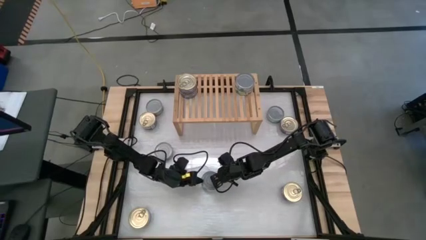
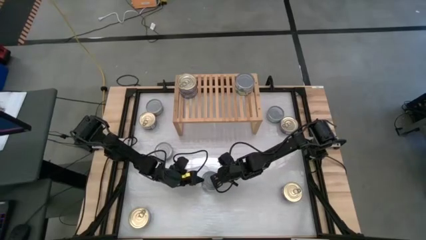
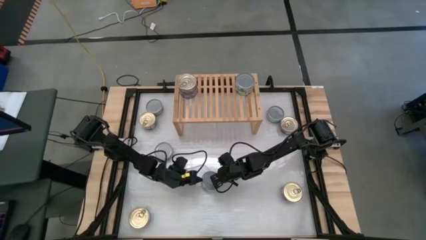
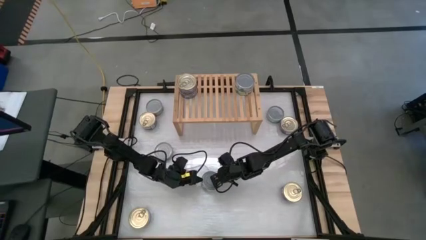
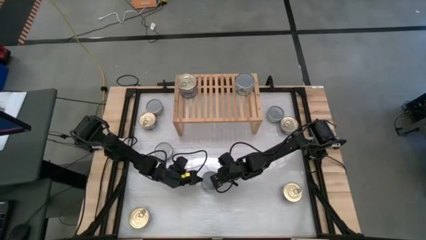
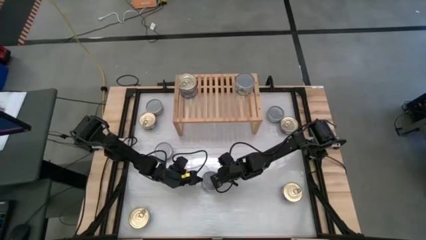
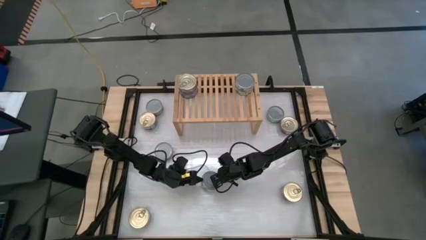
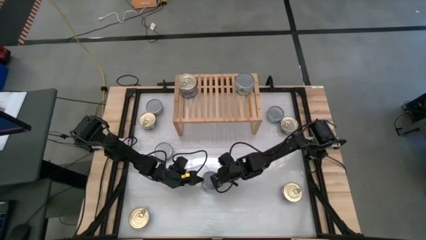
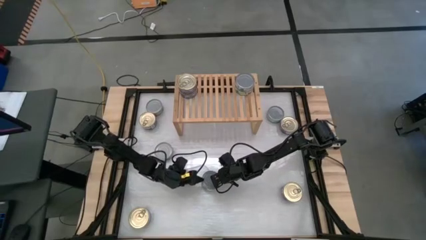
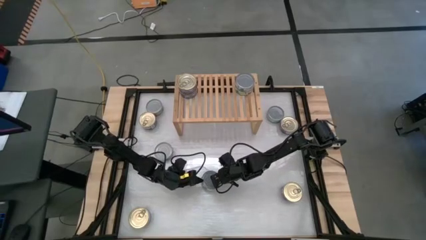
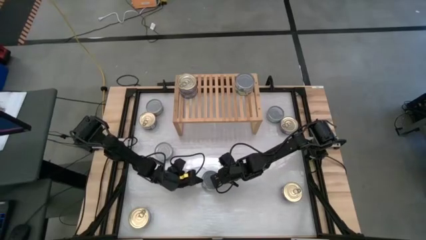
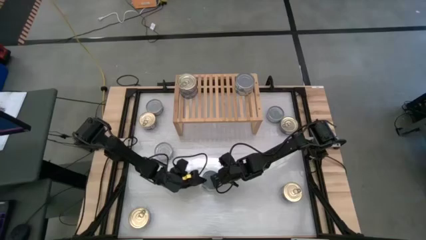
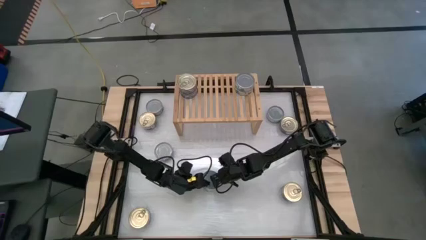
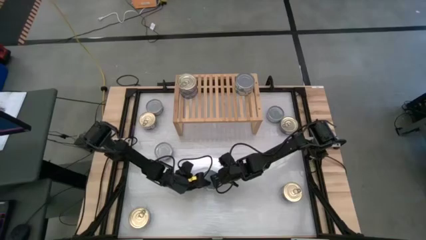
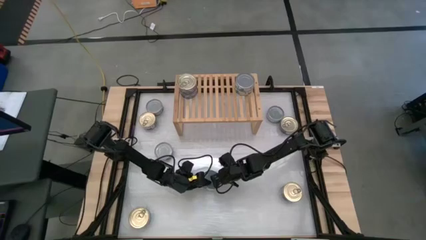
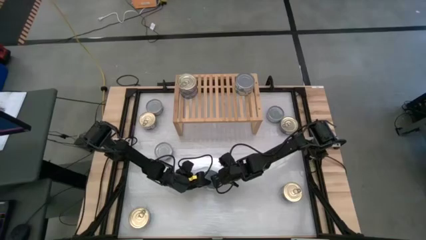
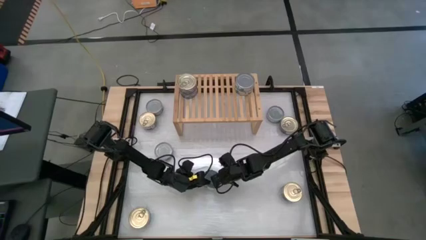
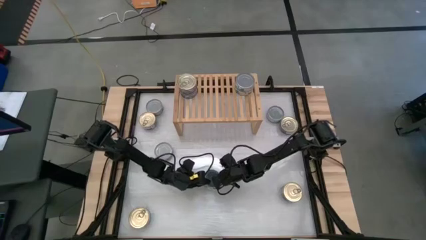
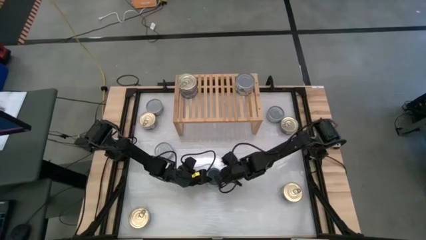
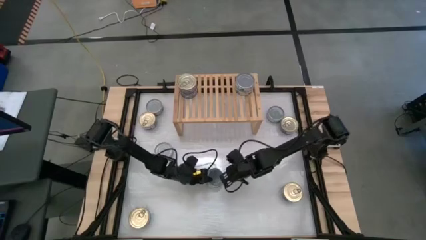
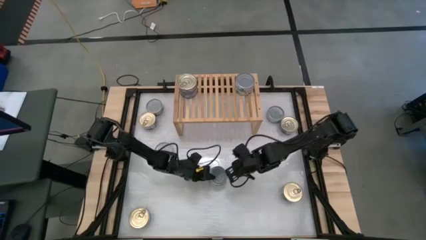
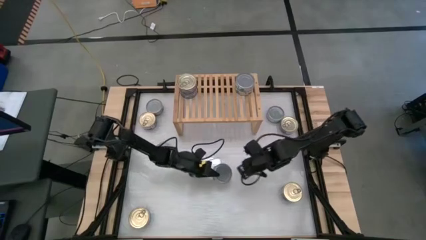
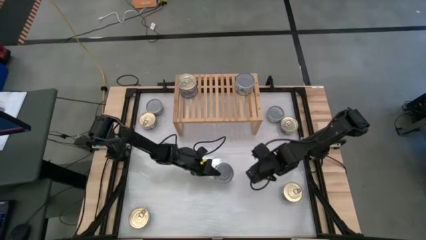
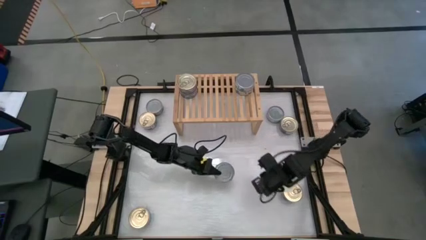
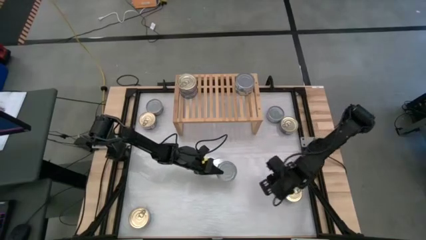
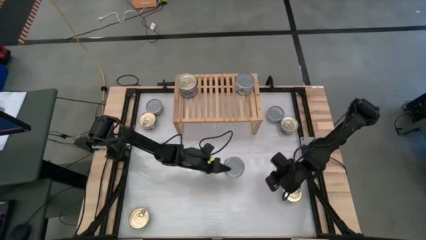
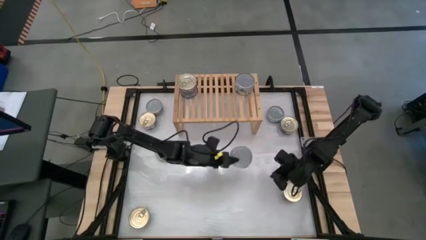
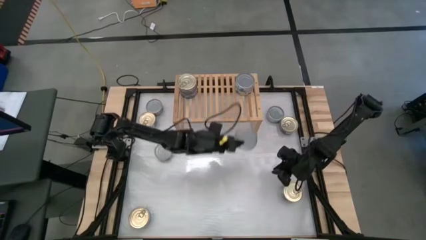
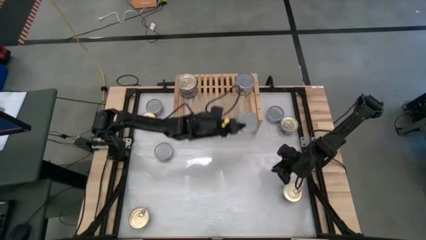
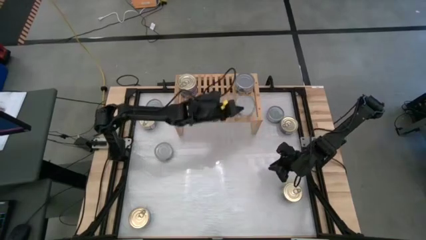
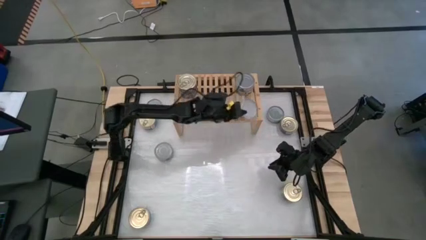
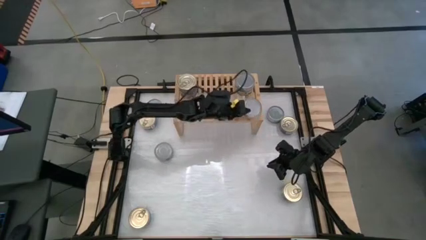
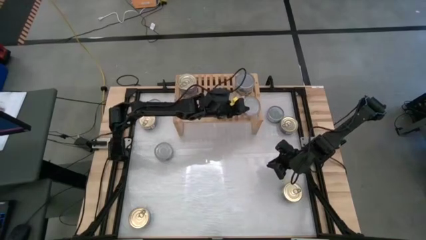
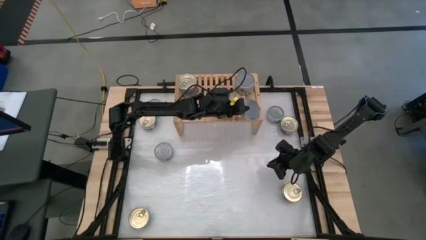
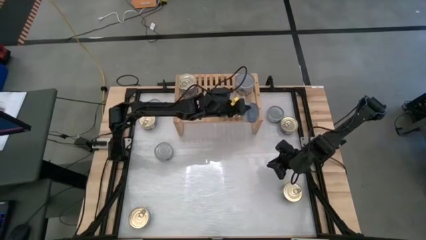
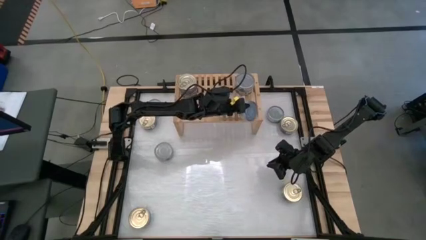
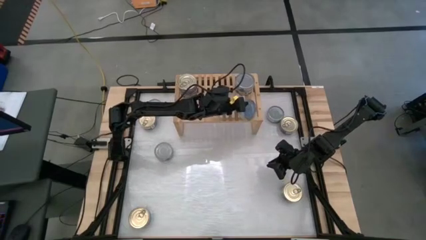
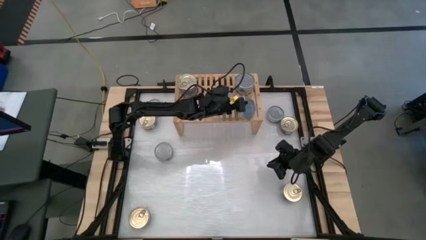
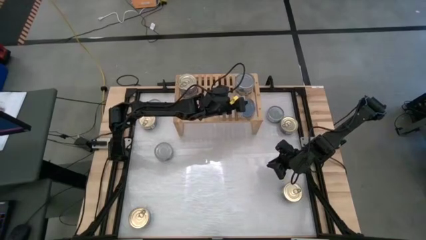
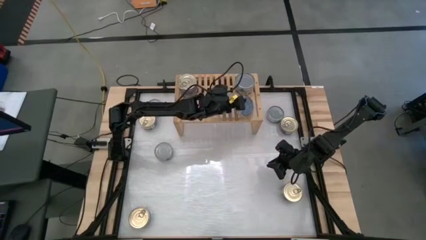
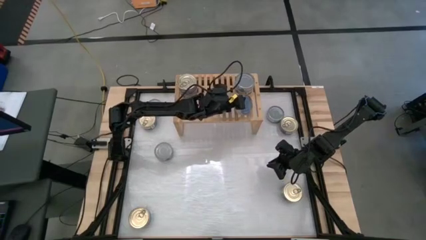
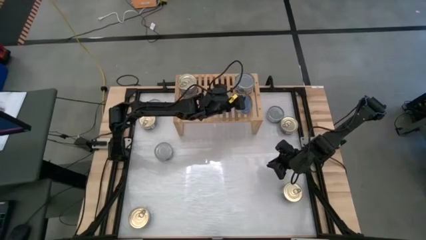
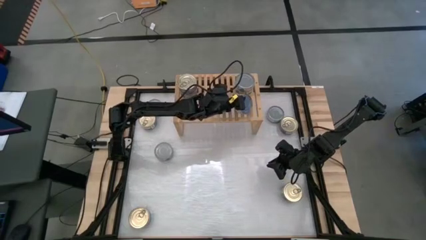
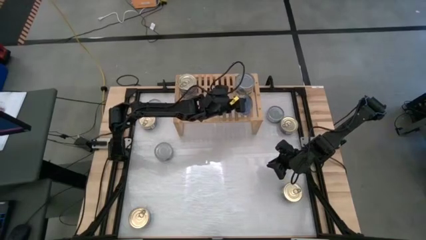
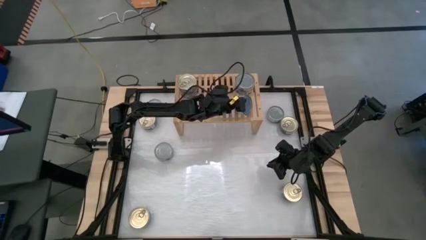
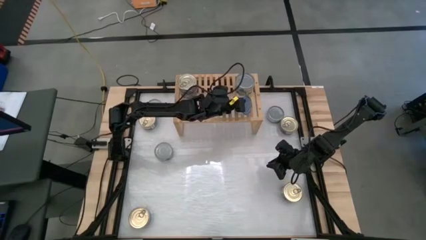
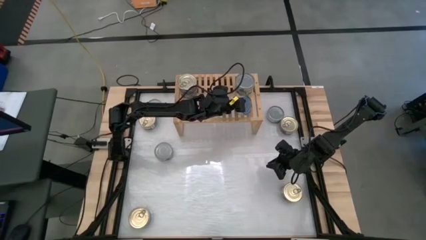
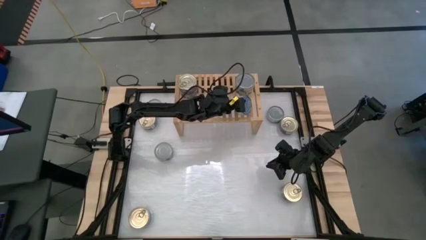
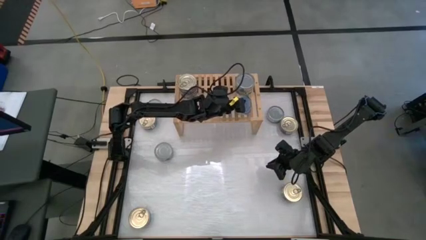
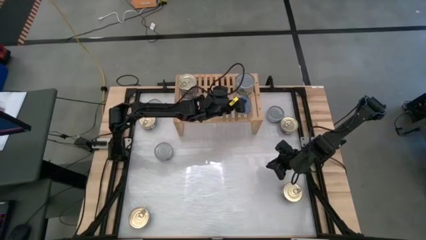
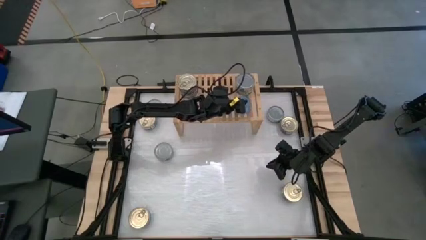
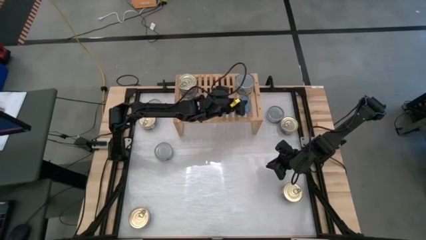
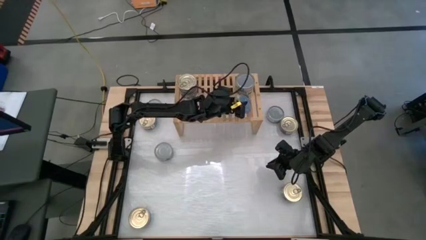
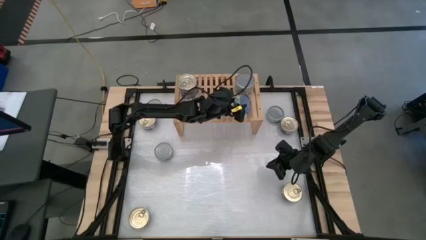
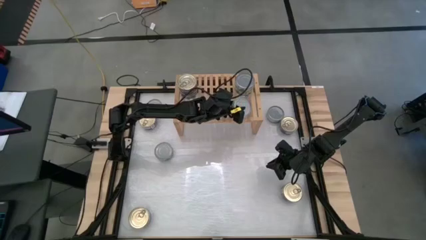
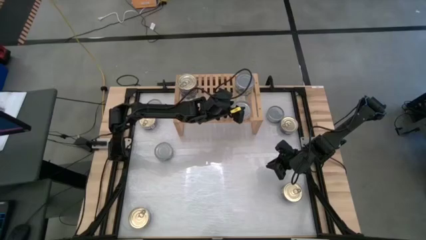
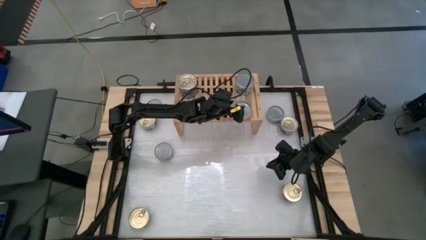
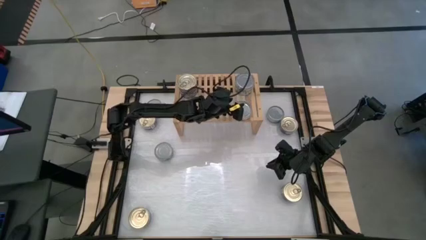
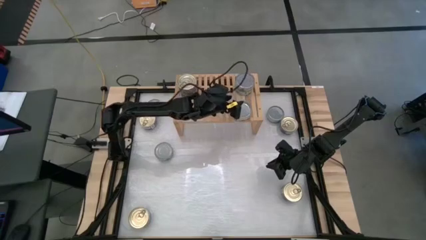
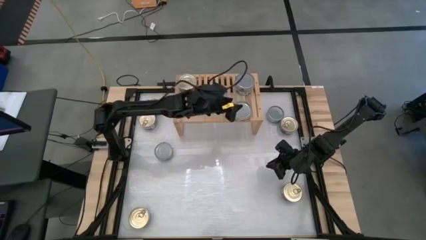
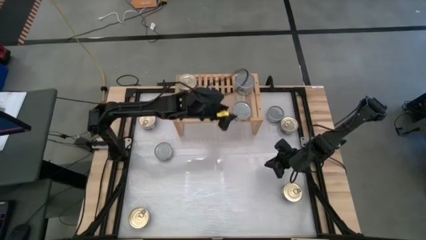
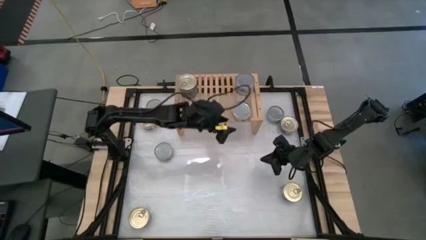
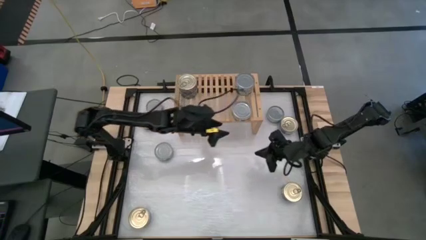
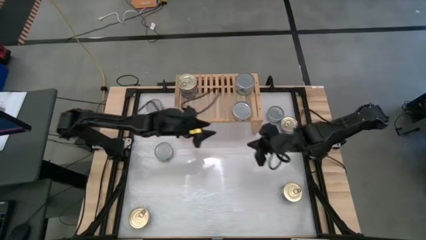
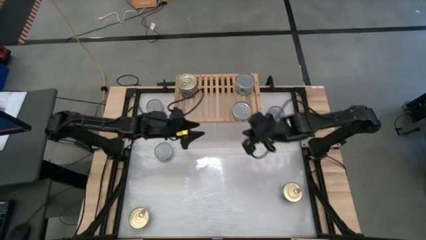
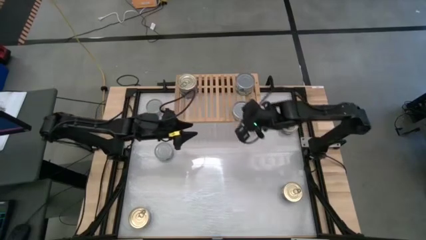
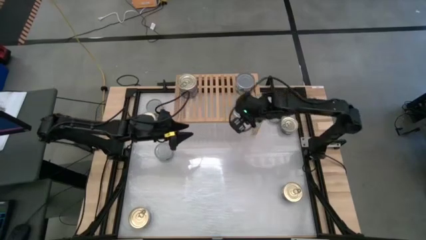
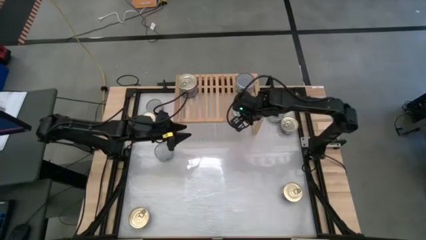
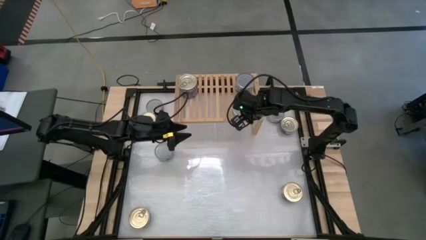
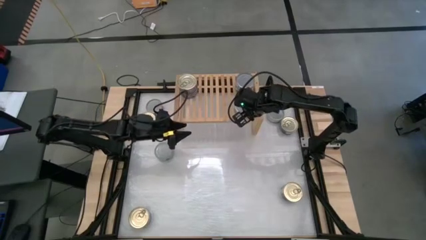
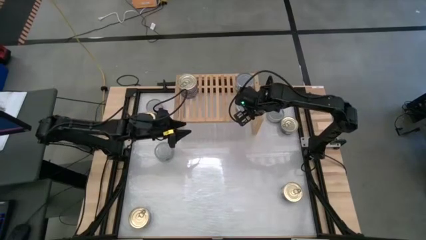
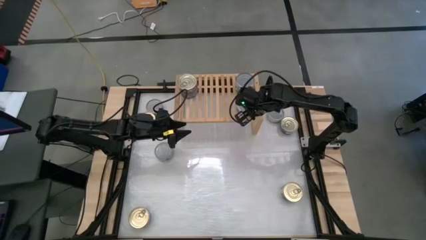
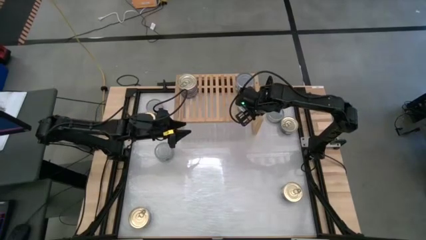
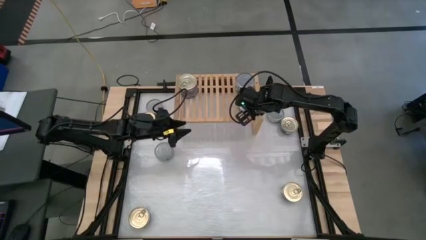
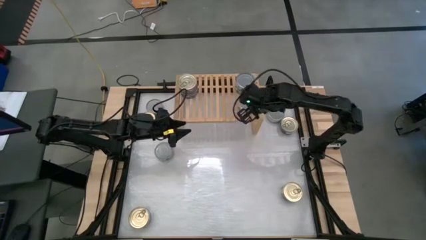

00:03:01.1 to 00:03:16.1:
Task: Stack canned seafood by type on shelf
Put the green tuna can on the shelf aligned with the other green tuna cans
